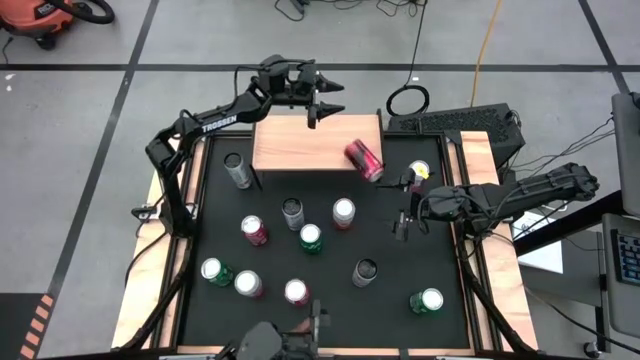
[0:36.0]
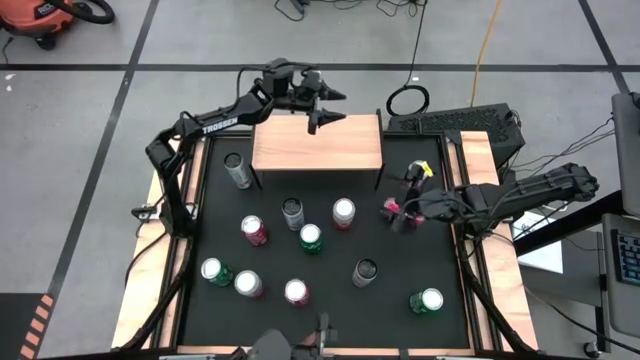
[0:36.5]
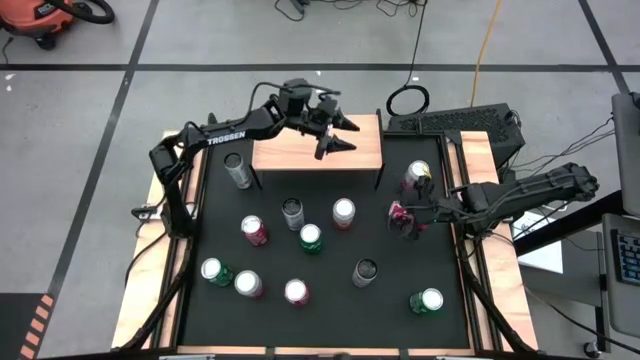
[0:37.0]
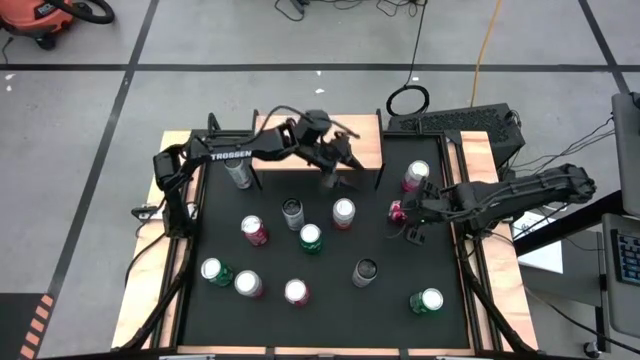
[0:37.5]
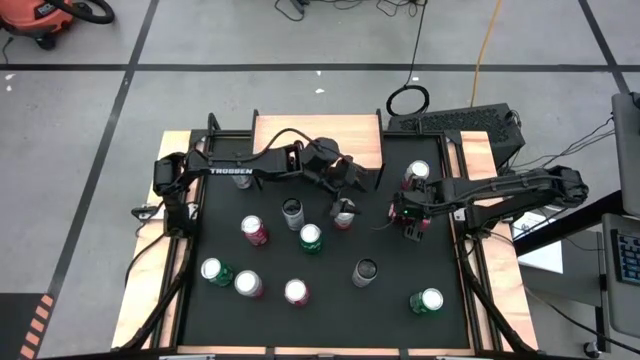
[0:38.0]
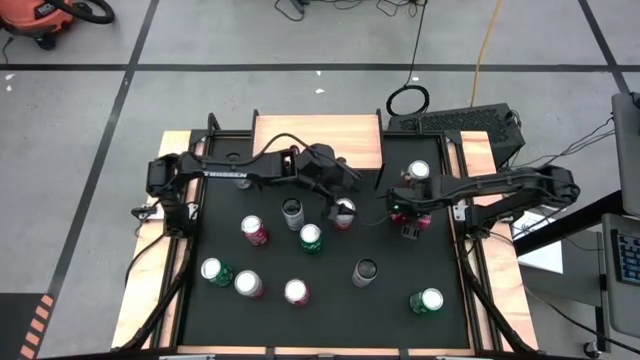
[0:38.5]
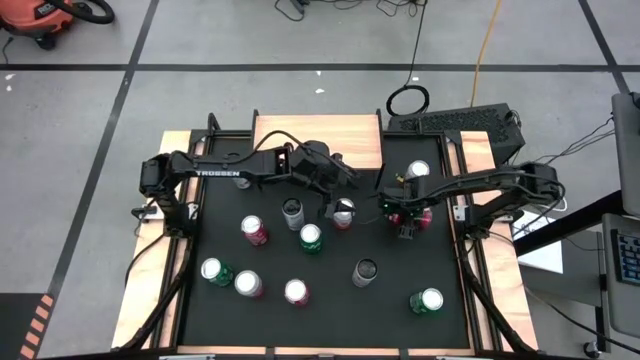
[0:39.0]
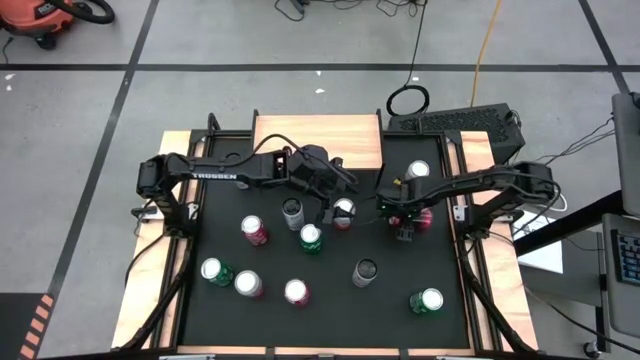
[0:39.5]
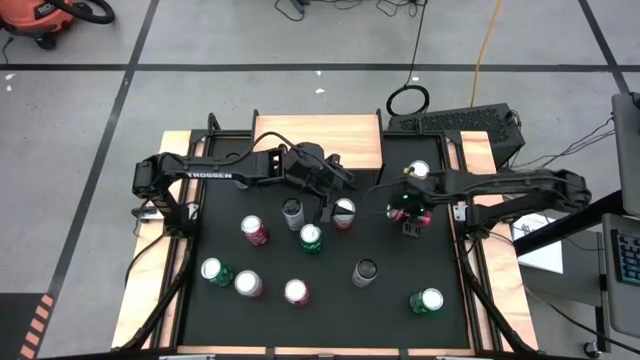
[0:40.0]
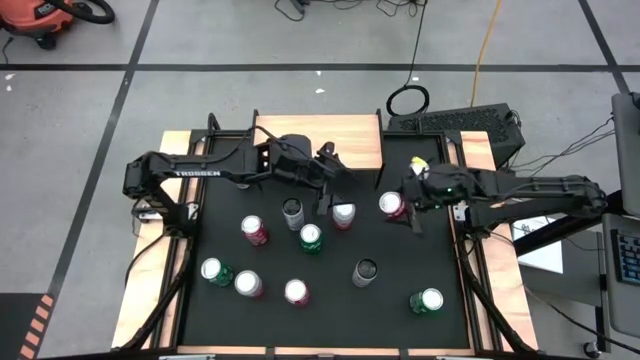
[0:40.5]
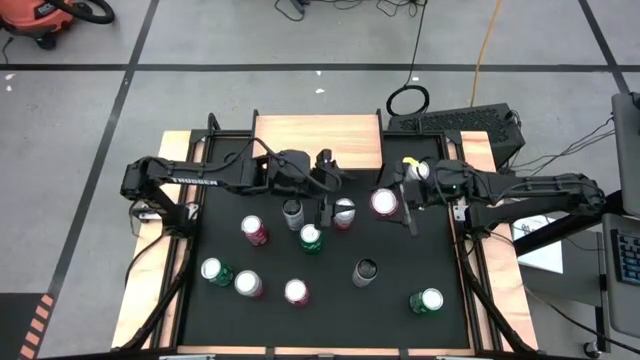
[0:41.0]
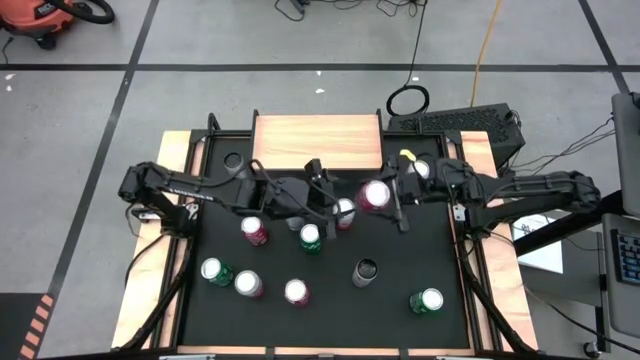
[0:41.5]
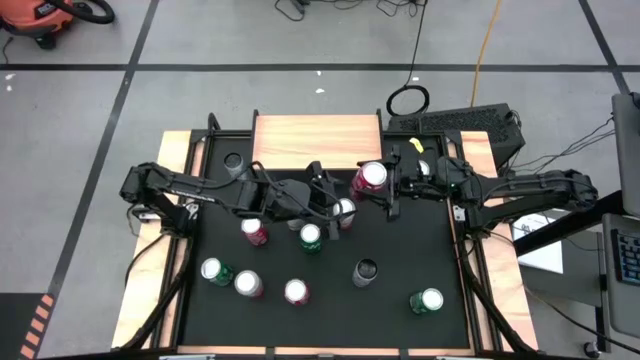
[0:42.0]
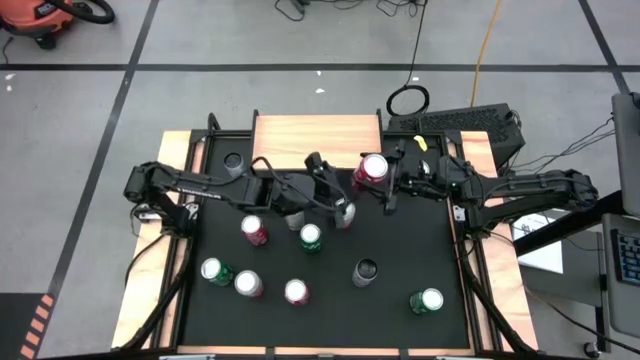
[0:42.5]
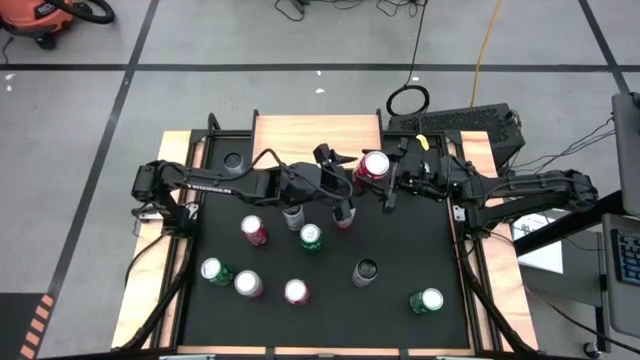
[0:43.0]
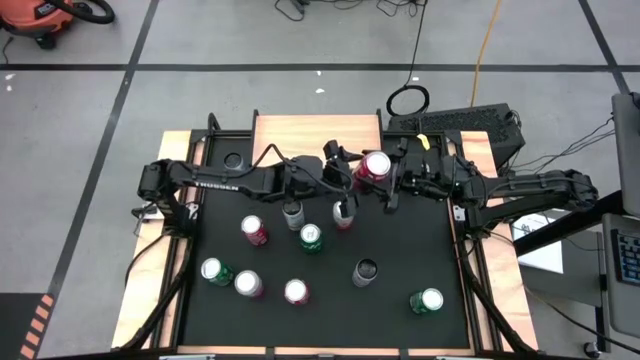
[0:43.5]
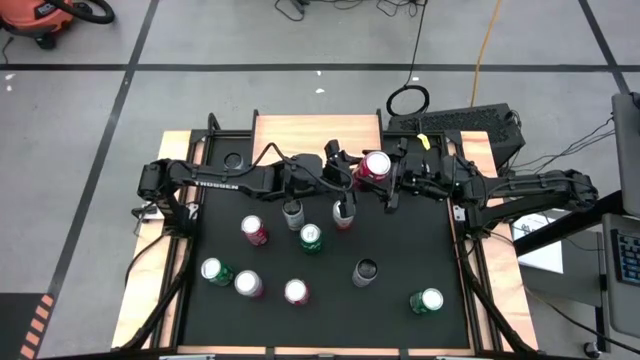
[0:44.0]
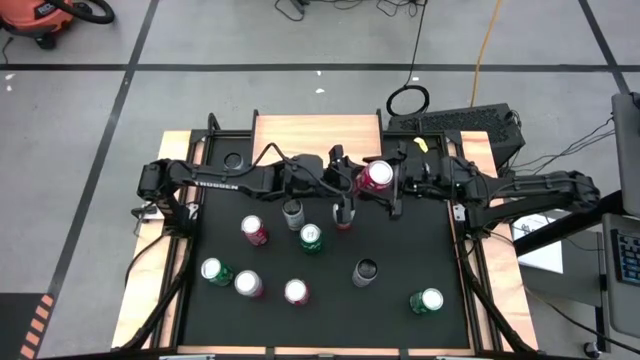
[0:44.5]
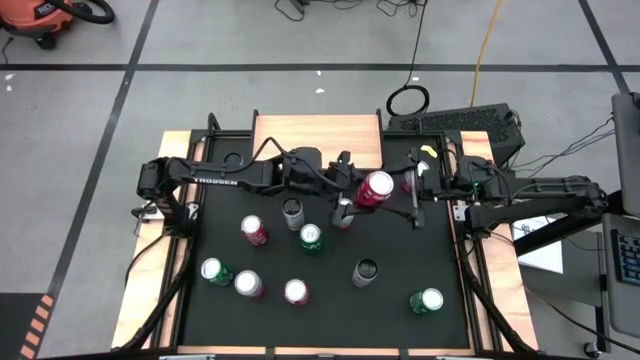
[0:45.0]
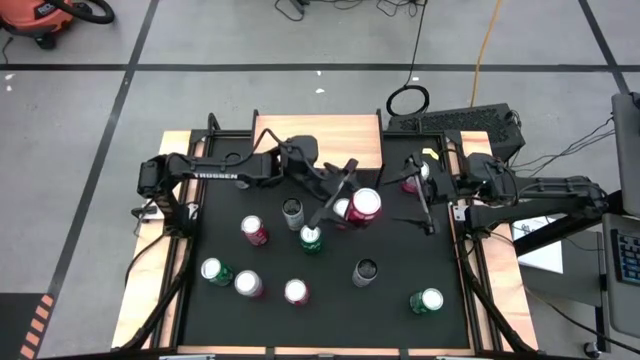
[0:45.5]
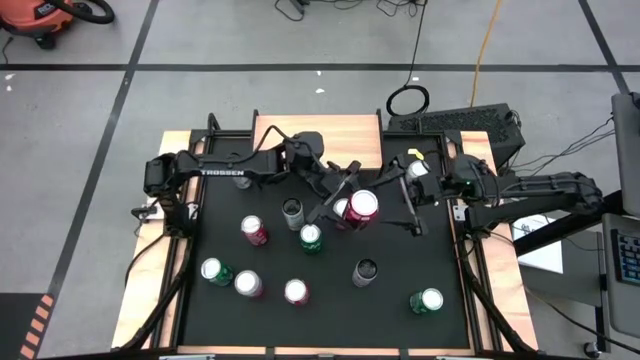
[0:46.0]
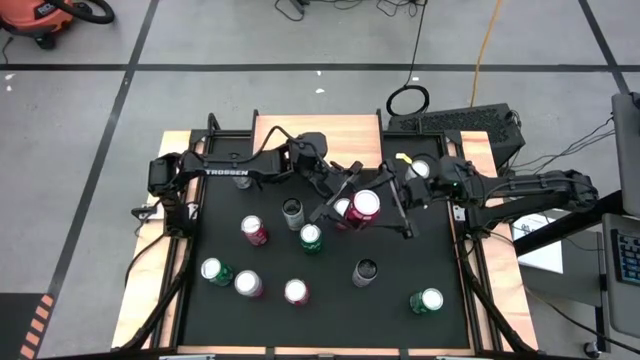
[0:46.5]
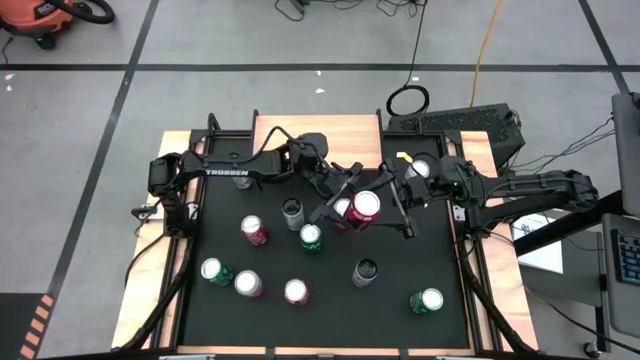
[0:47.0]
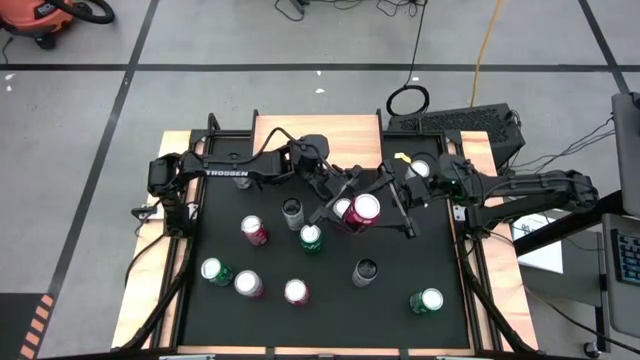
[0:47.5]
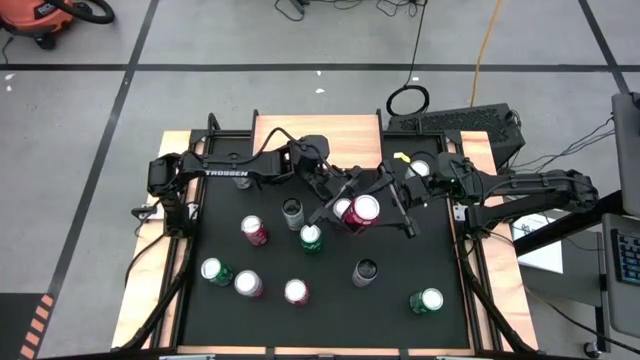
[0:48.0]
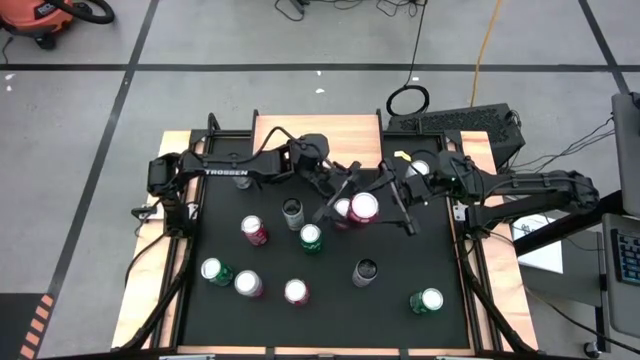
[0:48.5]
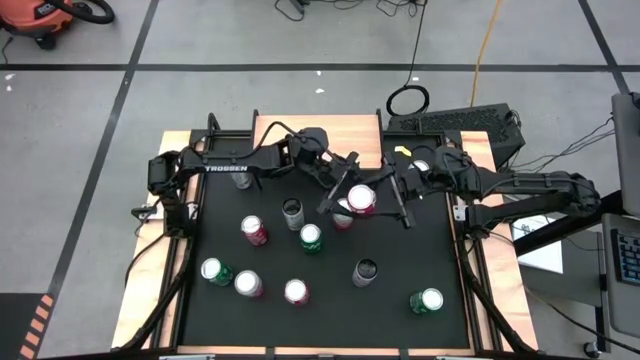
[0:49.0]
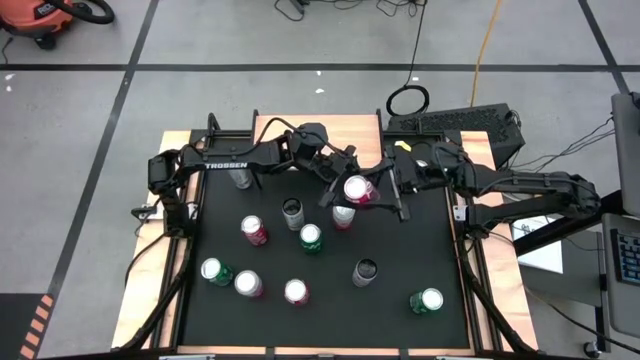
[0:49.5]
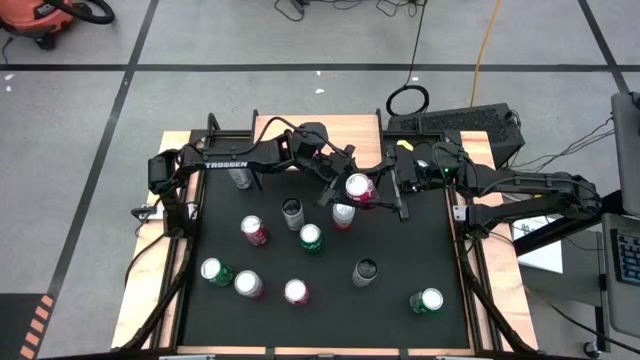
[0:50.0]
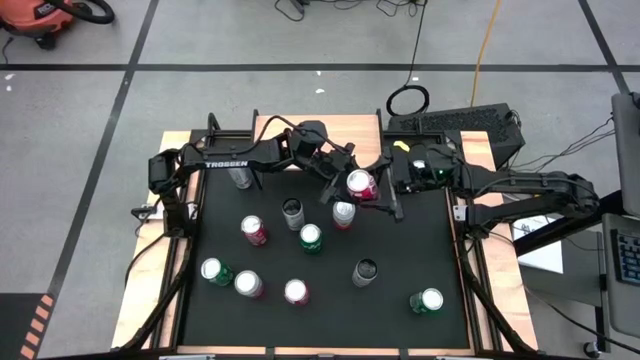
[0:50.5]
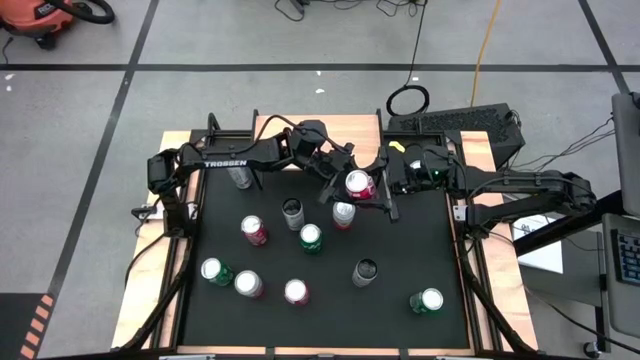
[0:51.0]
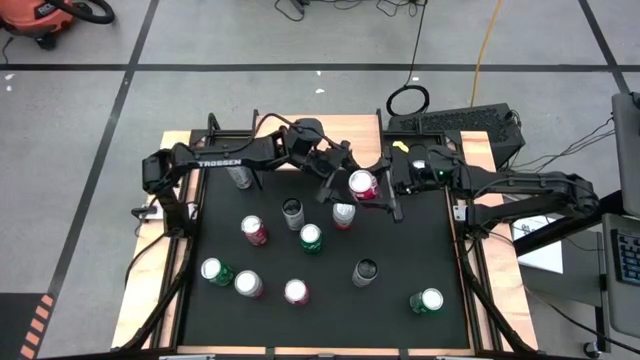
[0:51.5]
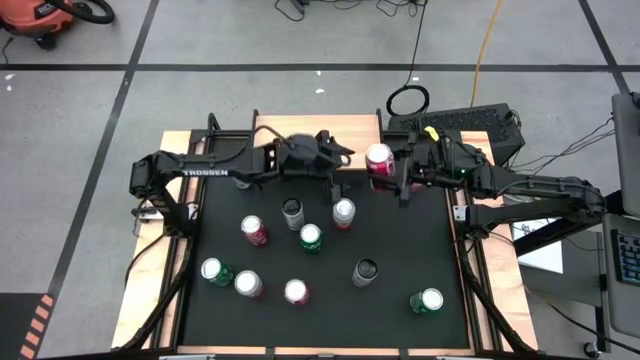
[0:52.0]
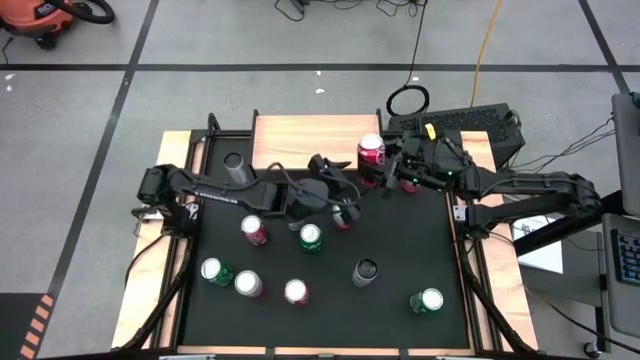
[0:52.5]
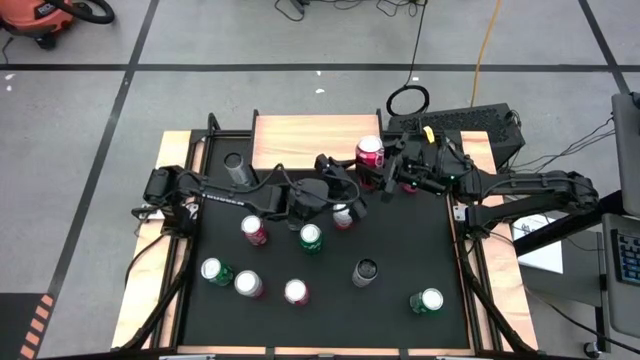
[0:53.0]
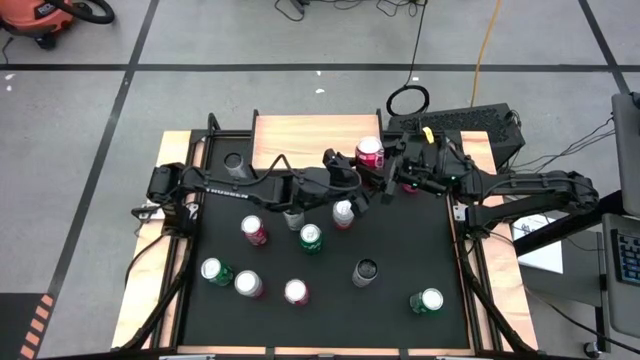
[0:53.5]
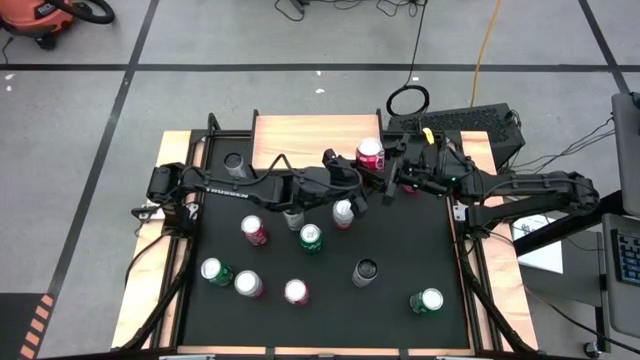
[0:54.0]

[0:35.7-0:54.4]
Task: Place canned beverage on shelf
Put the top right red soda can on the shelf

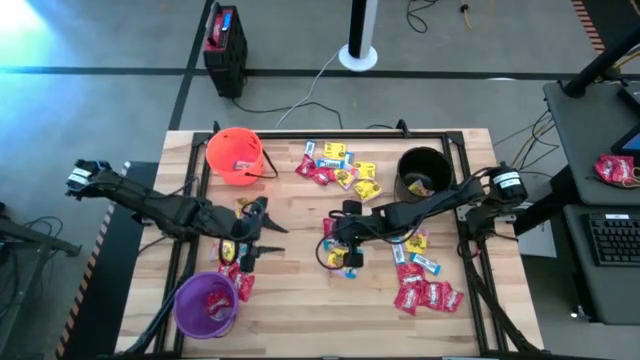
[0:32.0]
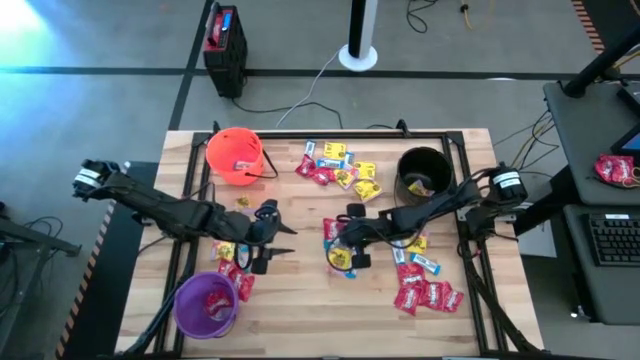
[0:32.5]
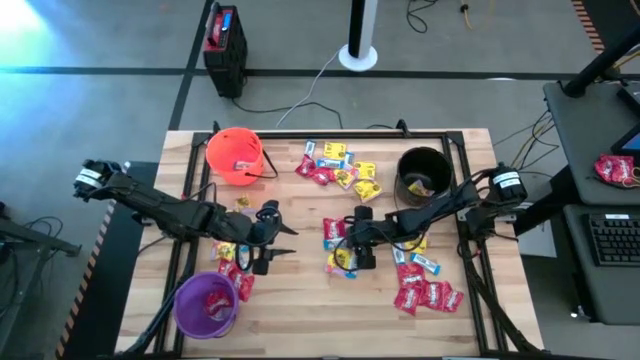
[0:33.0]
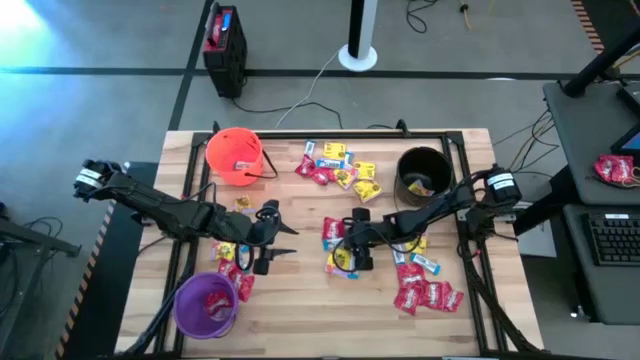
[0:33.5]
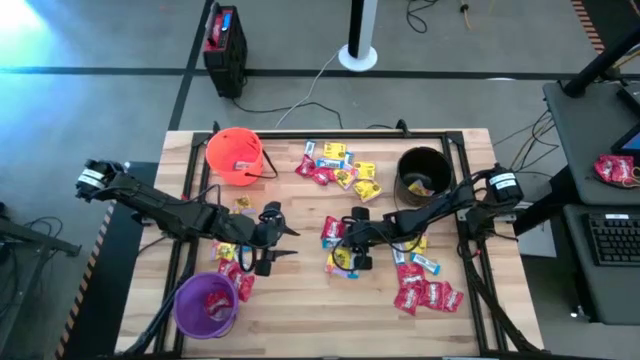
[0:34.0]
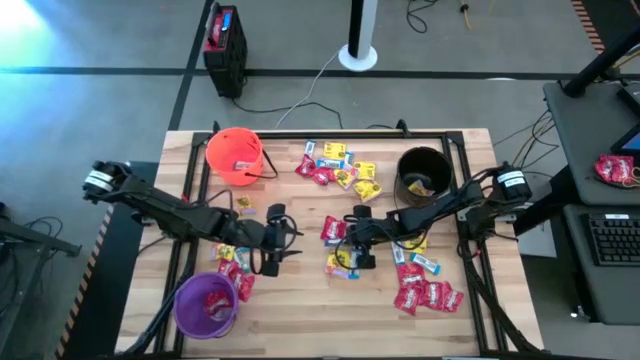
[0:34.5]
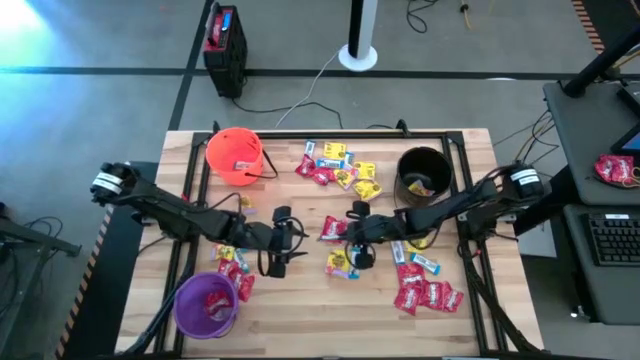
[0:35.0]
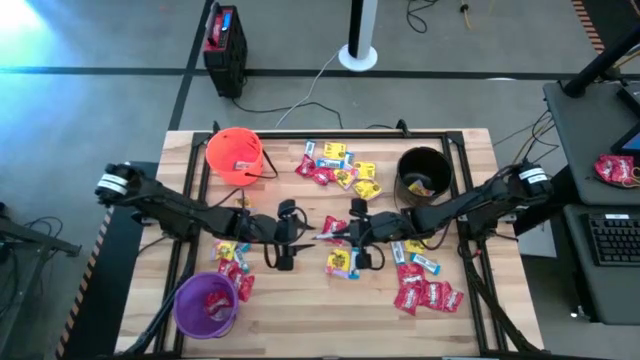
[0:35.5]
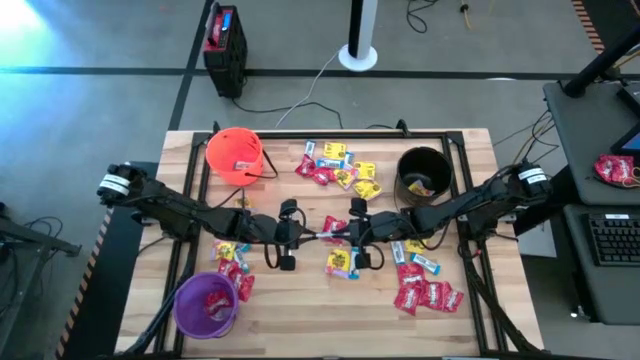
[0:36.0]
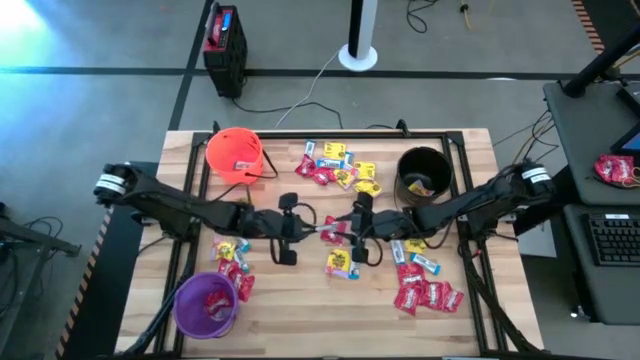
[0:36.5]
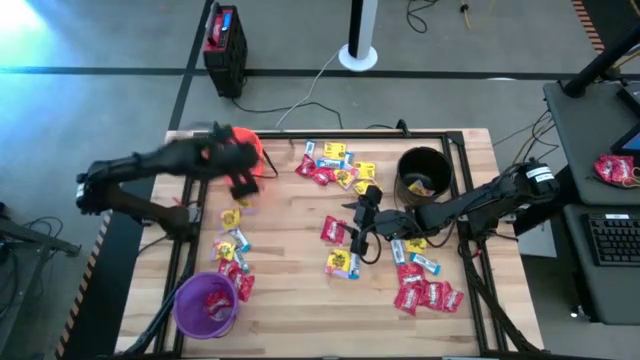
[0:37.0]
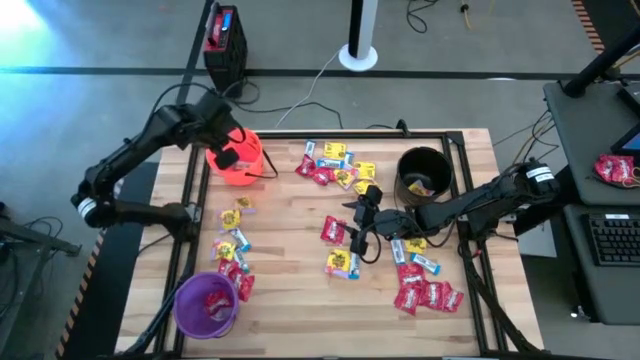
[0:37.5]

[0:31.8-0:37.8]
Task: Sort candy by brand, put in halloween buckets
Put the white chocolate bar into the orange bucket
